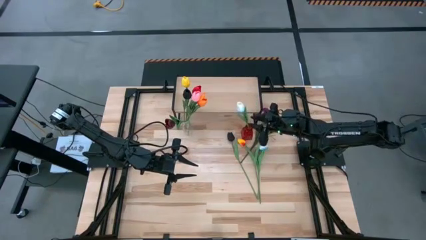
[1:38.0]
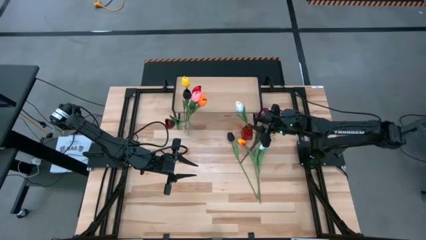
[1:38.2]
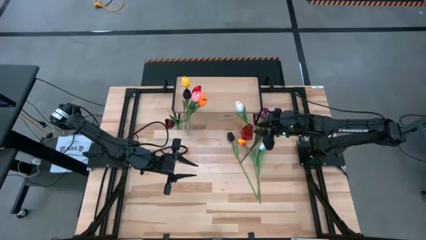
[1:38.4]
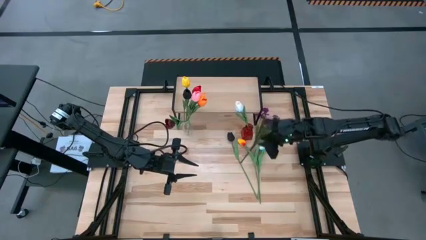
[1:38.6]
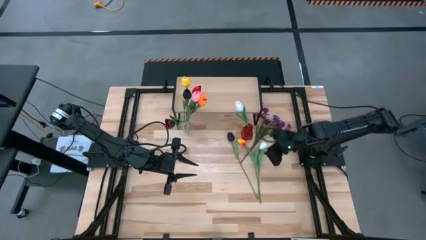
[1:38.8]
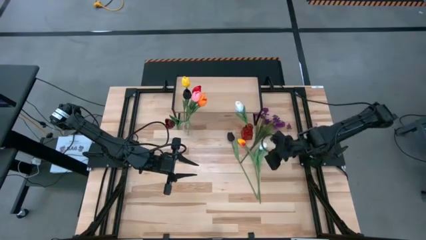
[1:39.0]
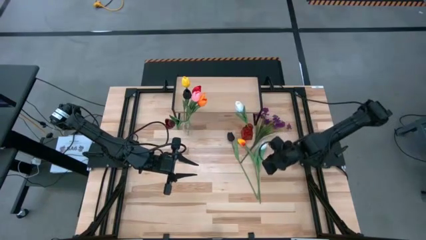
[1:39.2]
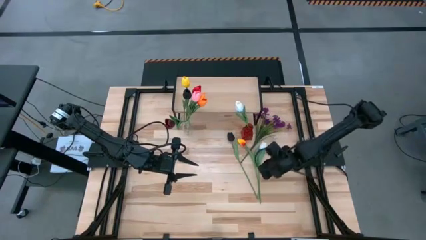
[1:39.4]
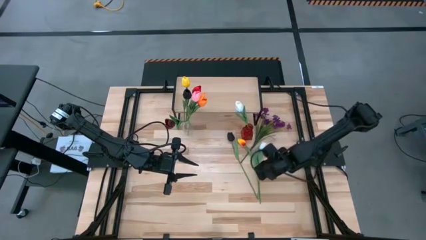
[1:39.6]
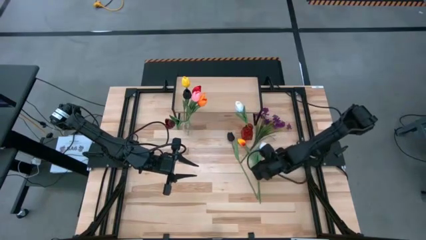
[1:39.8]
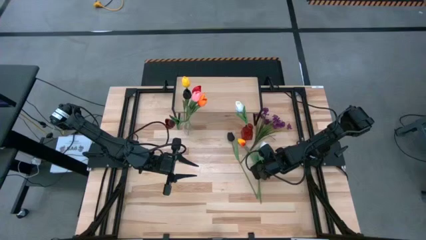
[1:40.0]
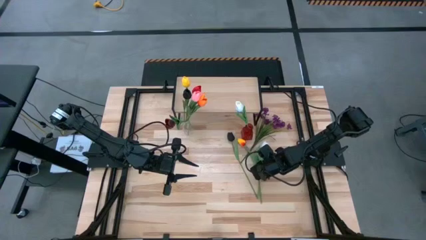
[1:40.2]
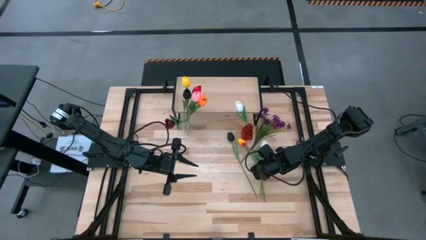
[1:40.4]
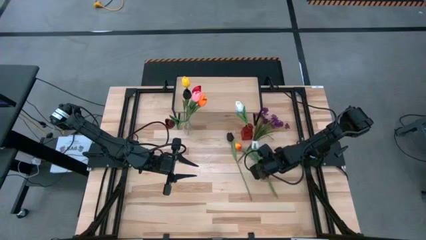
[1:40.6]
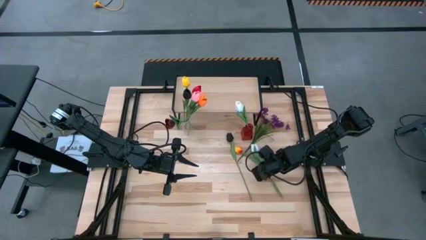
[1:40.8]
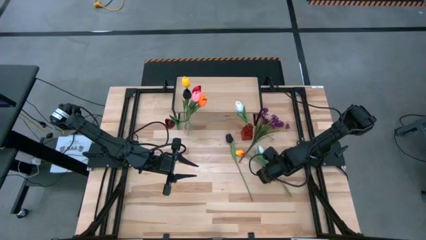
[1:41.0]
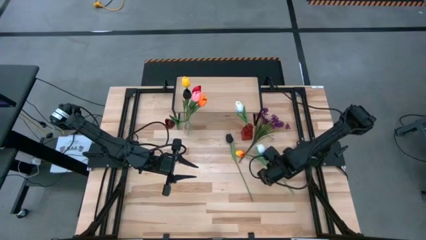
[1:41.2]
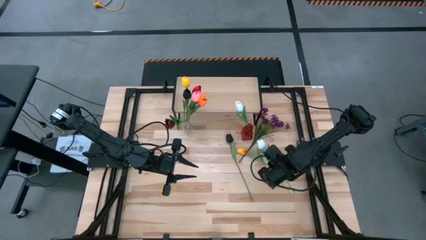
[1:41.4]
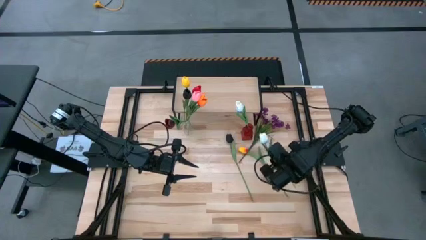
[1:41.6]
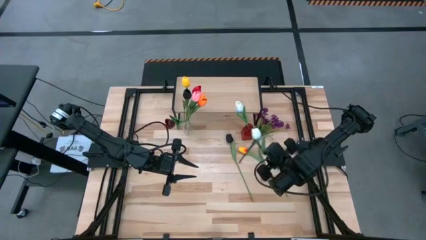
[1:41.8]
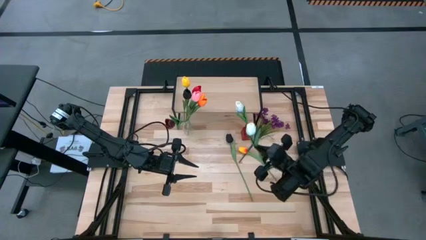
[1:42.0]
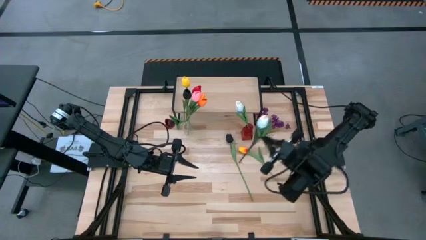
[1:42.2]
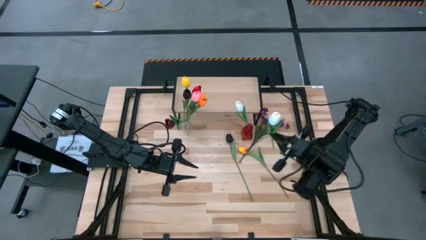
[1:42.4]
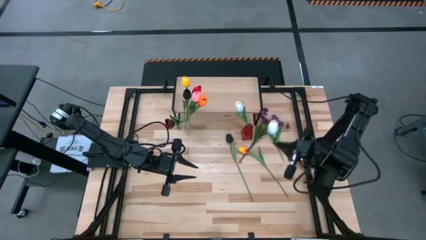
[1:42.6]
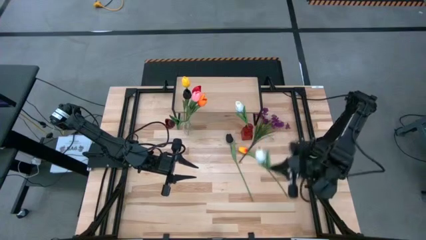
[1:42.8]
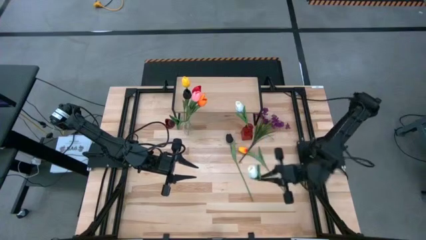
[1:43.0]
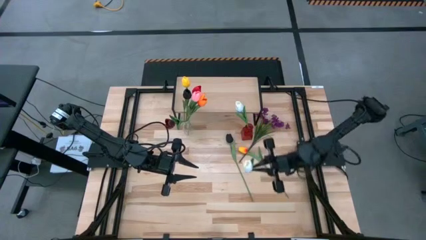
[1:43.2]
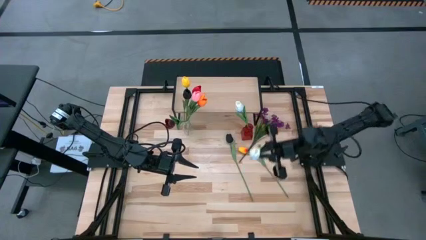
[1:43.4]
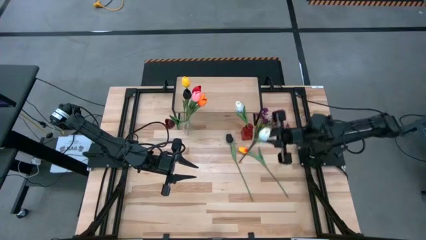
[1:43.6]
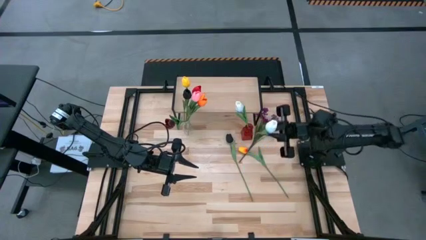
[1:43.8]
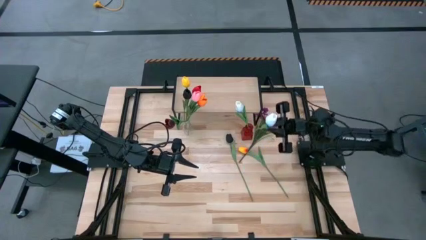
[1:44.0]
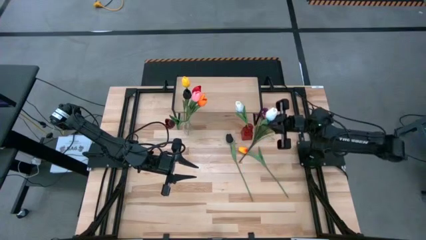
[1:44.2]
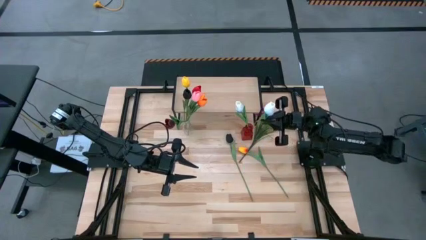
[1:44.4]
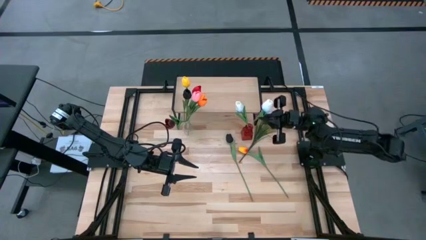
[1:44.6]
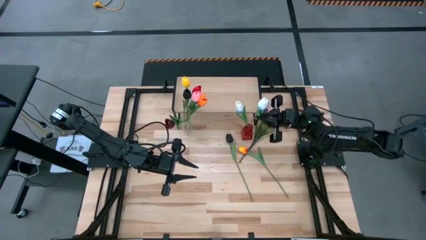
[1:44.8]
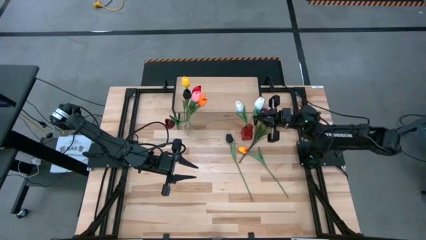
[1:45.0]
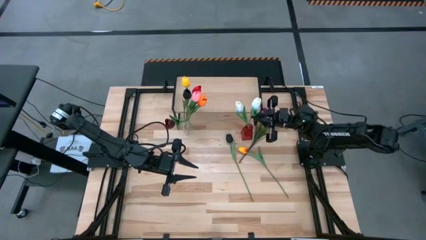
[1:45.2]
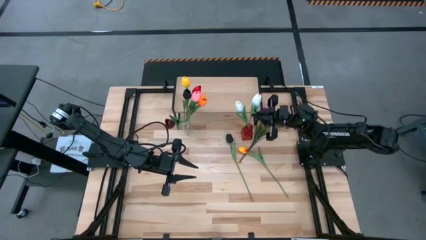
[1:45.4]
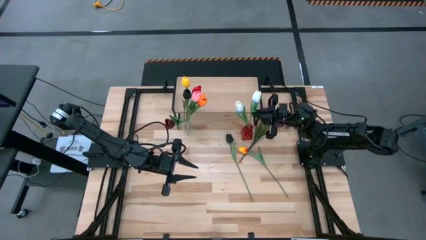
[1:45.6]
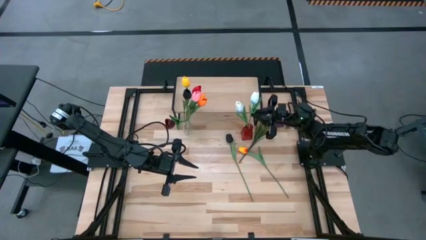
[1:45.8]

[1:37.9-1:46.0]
Task: Pick and place flowers into a vace then onto a shelf
Put the white flower into the red vase

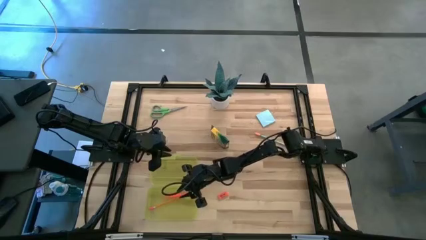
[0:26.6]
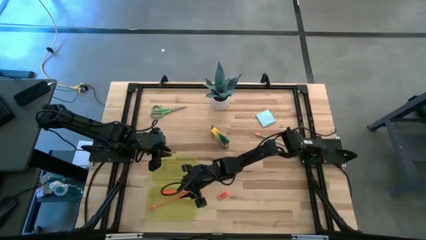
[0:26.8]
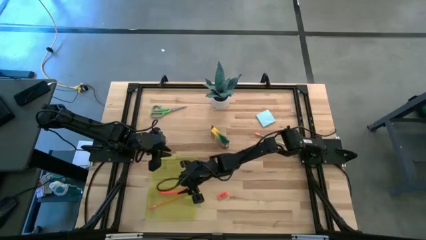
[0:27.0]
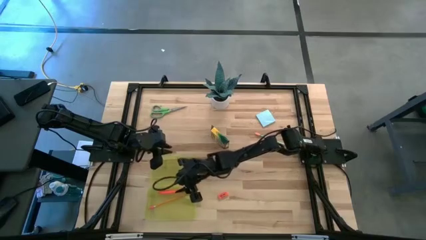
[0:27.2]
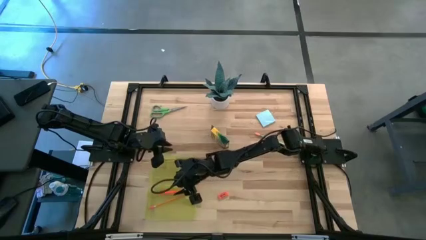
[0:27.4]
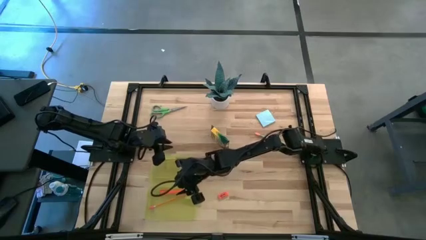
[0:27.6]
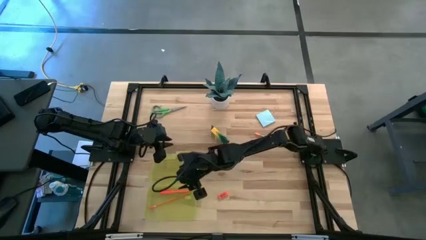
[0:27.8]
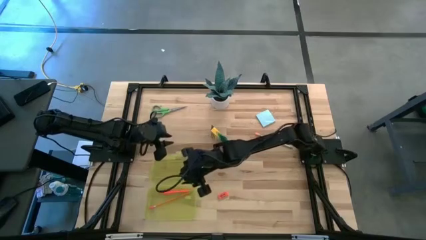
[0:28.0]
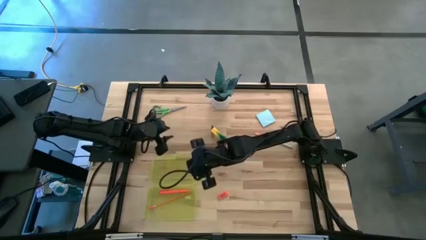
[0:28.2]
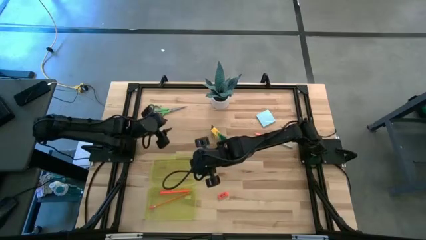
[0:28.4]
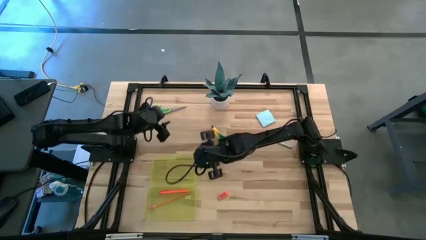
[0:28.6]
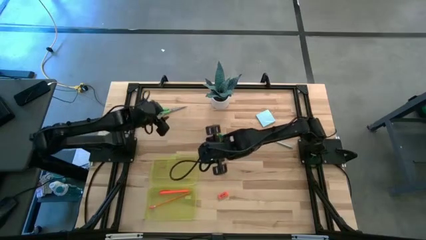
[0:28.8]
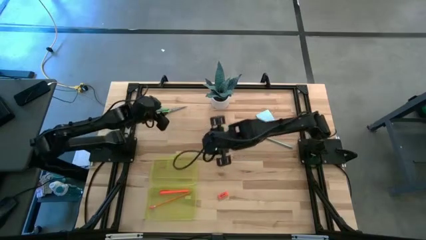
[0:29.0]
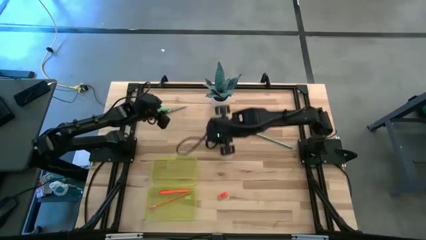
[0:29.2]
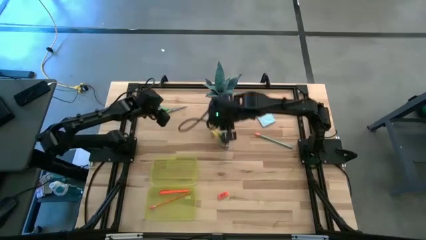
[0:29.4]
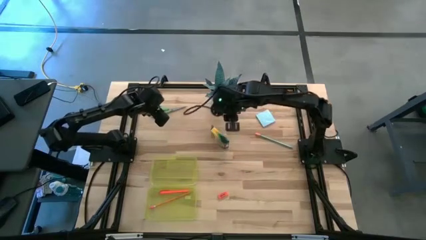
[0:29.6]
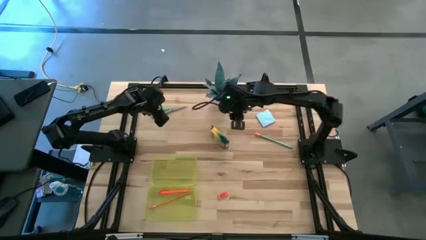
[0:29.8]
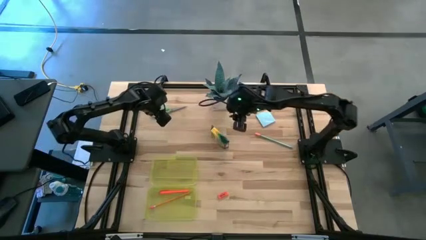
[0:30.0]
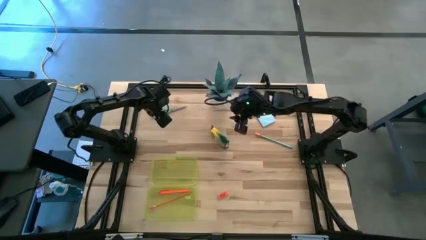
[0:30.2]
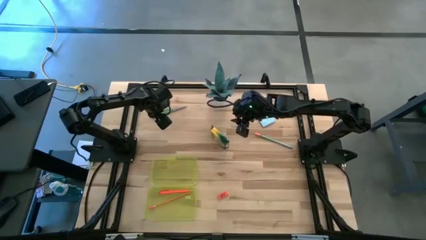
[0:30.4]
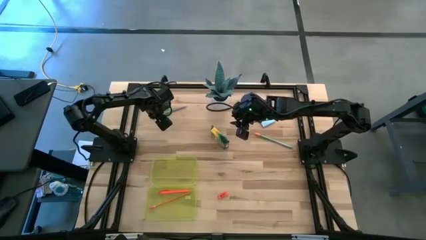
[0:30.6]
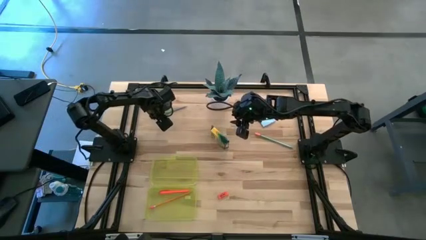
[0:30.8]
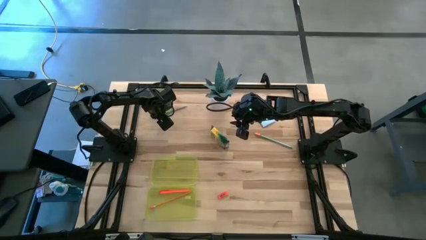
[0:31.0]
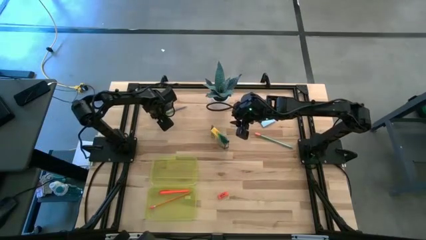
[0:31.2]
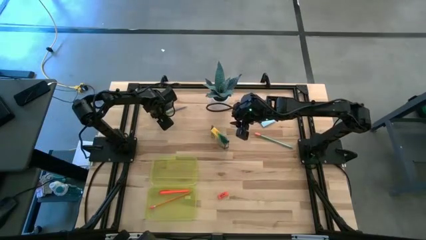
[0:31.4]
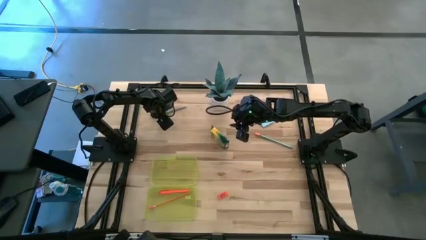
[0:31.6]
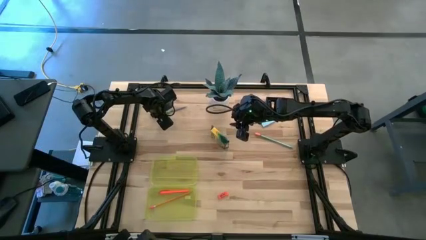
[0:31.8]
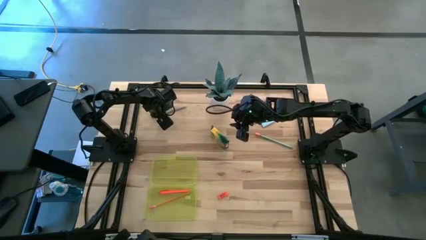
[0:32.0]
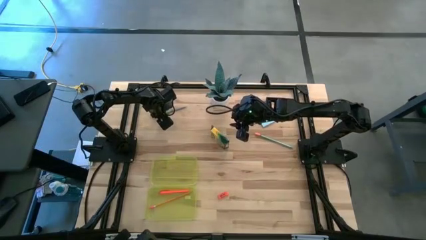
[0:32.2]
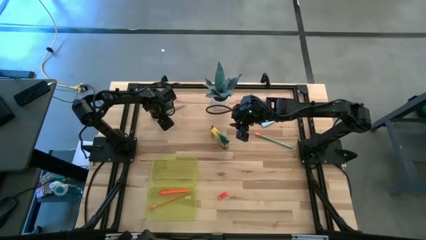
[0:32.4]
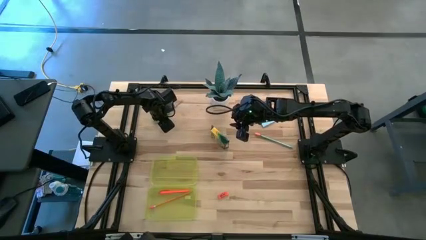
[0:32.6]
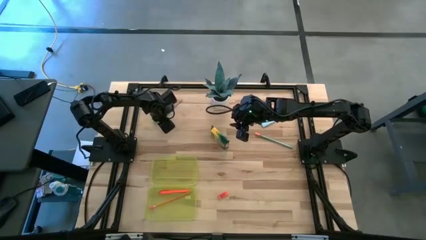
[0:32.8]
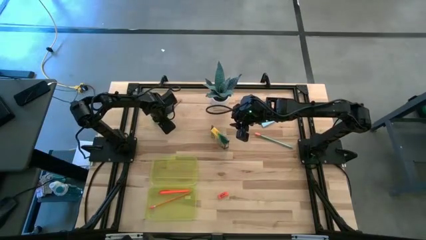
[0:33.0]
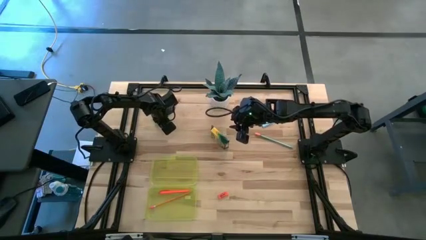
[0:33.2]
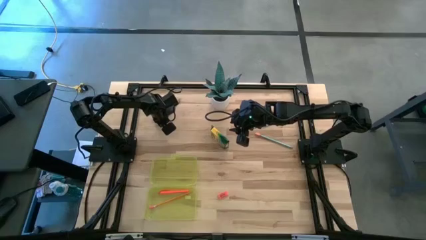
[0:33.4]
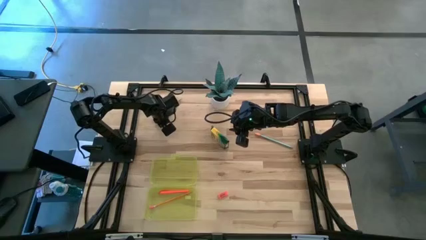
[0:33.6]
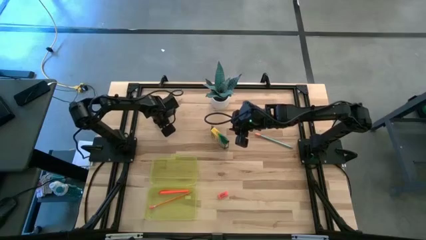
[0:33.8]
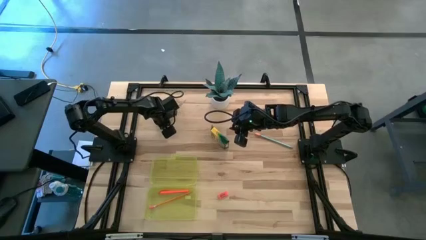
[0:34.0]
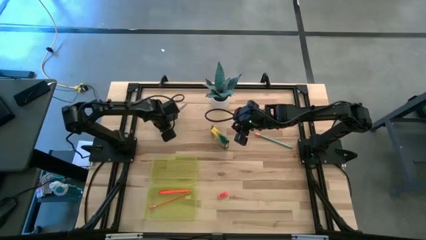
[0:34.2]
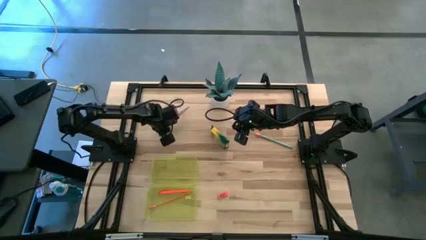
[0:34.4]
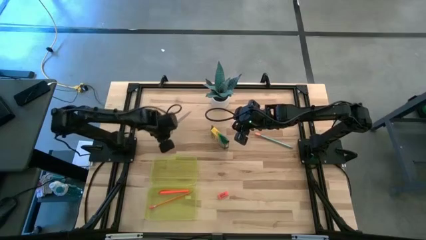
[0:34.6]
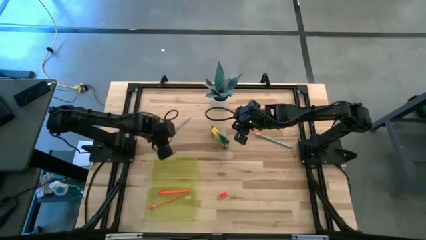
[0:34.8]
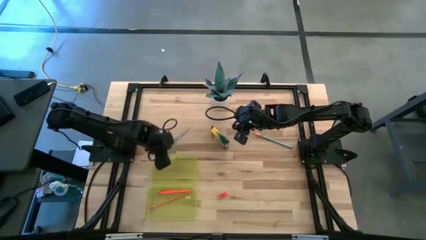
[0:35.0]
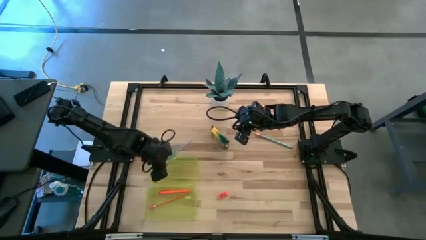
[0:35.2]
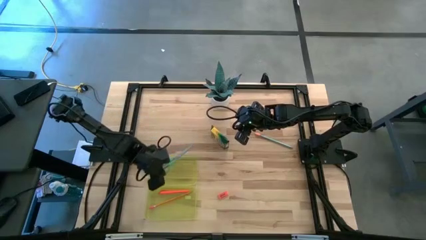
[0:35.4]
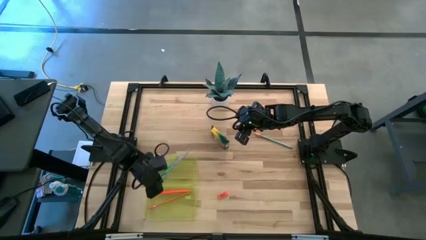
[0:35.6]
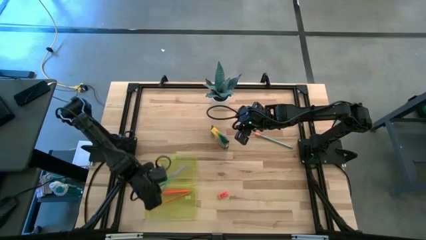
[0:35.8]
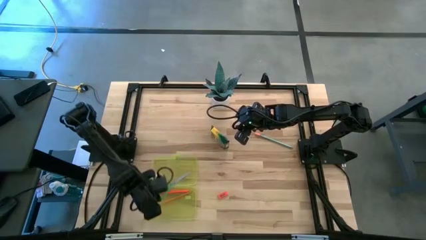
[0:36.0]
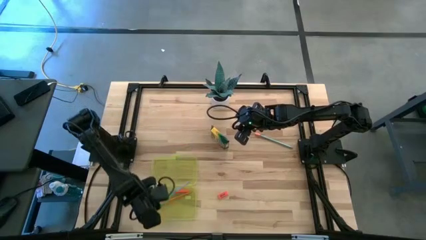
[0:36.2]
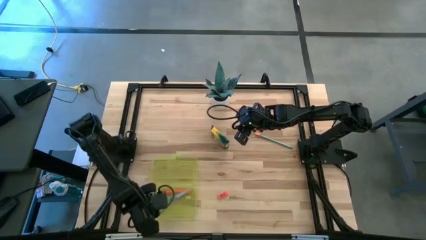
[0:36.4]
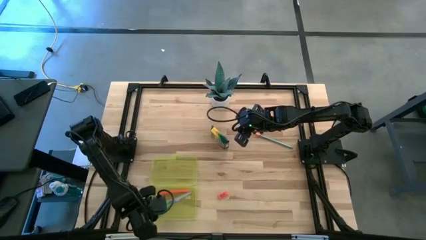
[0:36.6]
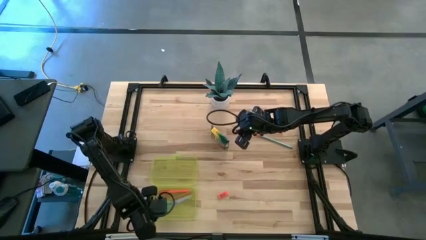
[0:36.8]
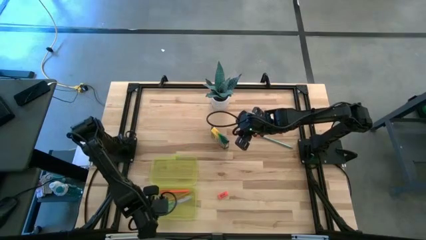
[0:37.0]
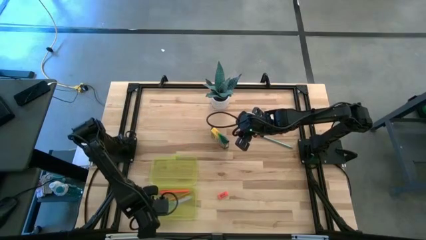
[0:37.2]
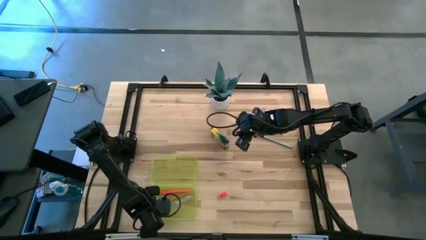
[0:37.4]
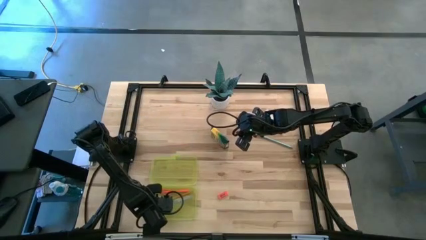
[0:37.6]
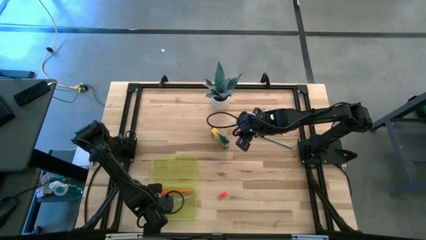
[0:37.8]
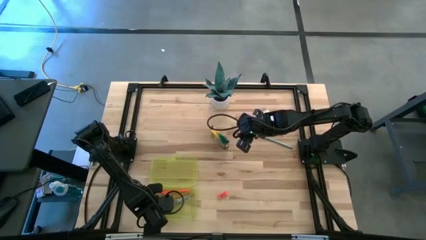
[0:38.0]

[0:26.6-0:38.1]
Task: Pack school essentials
Put the green scissors into the yellow supply box
